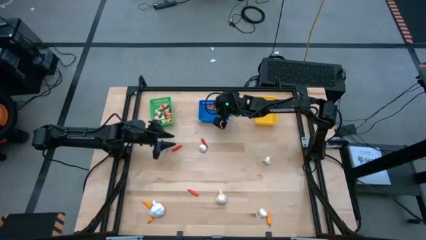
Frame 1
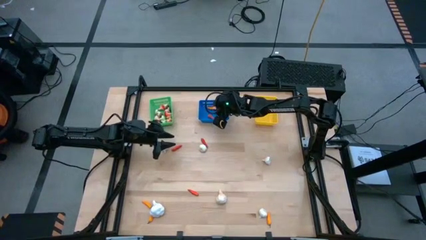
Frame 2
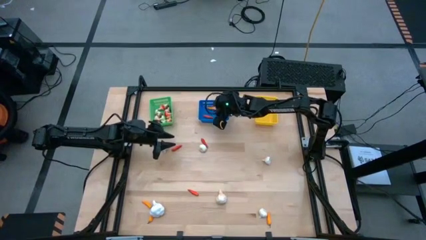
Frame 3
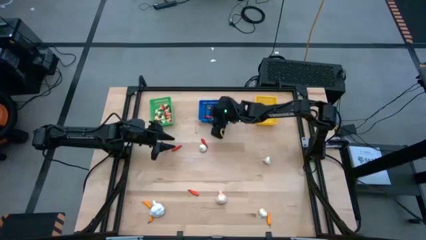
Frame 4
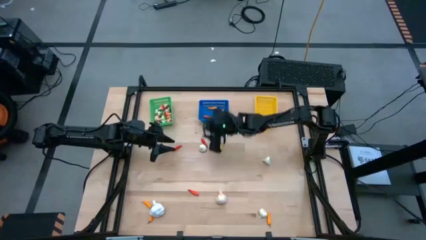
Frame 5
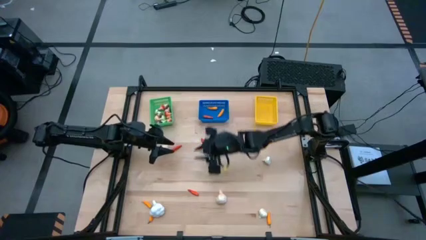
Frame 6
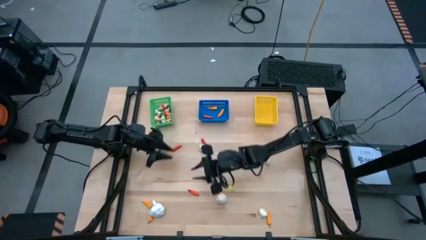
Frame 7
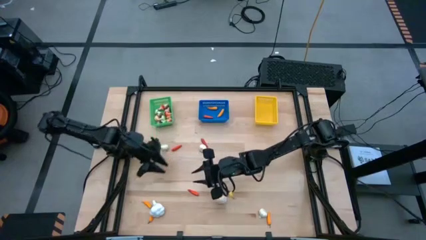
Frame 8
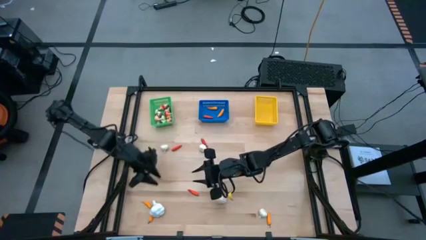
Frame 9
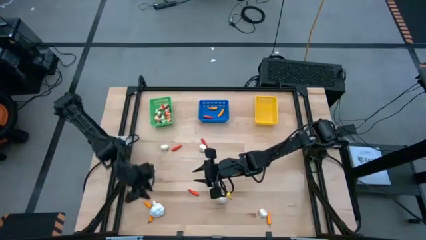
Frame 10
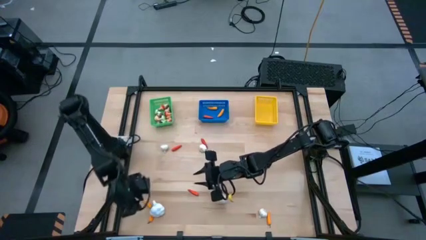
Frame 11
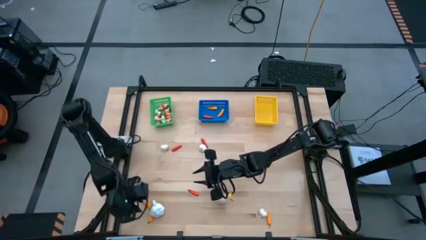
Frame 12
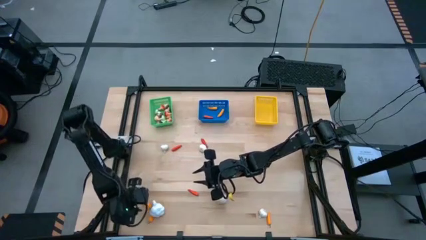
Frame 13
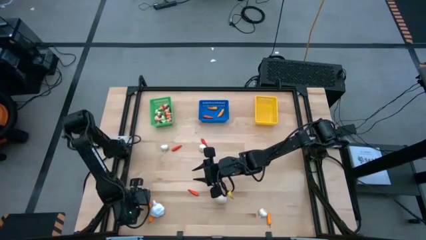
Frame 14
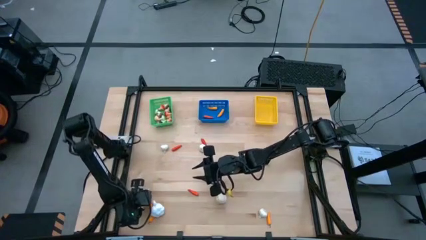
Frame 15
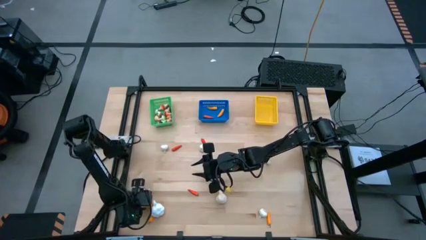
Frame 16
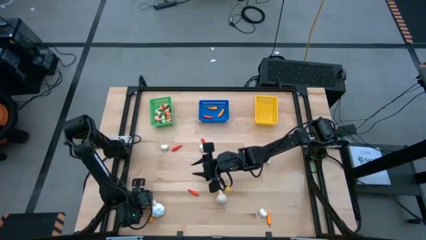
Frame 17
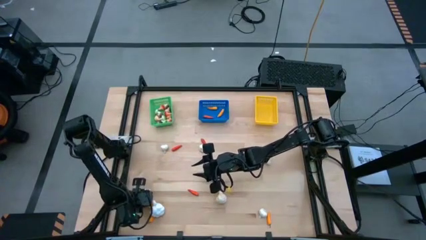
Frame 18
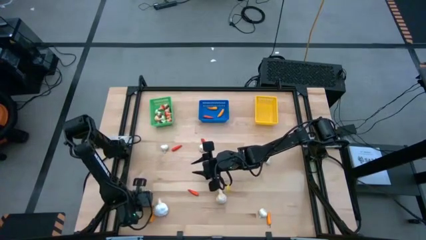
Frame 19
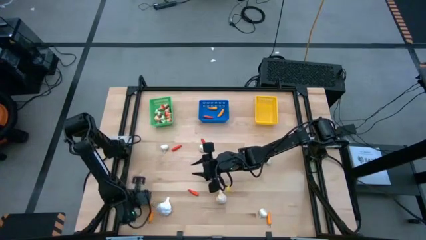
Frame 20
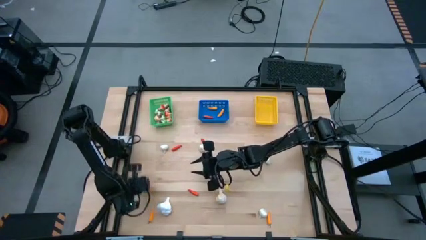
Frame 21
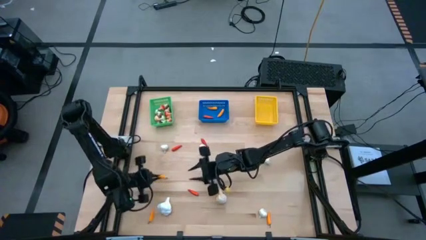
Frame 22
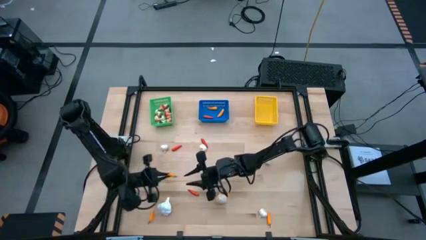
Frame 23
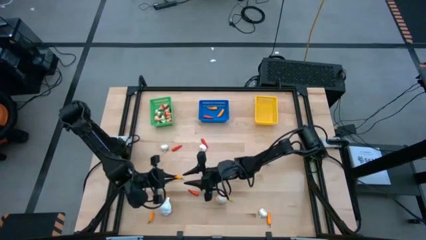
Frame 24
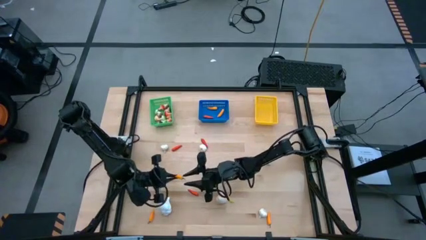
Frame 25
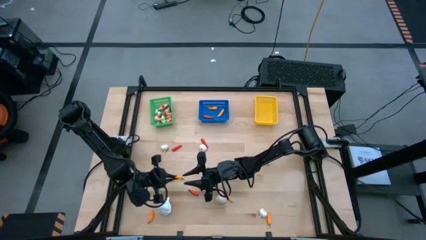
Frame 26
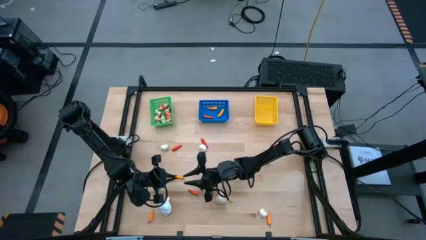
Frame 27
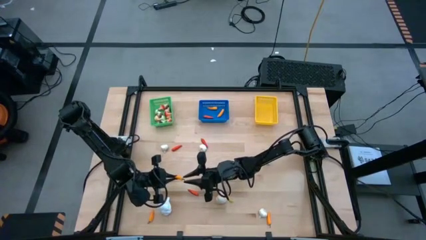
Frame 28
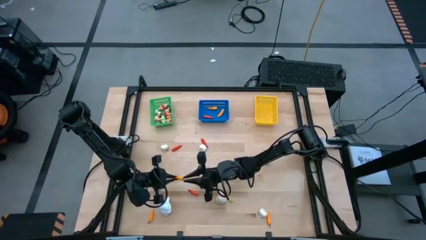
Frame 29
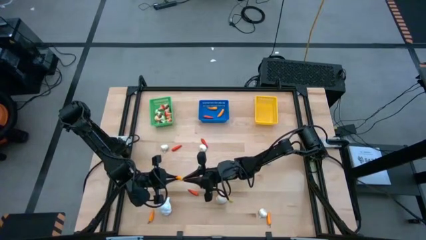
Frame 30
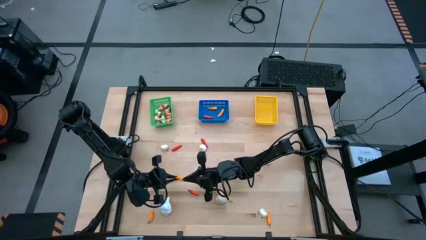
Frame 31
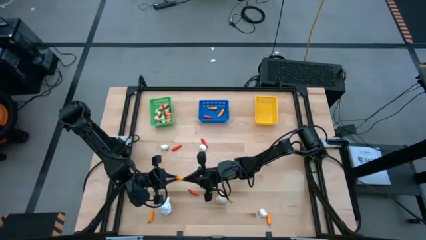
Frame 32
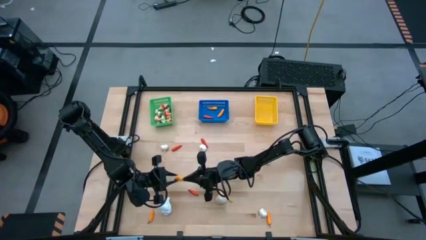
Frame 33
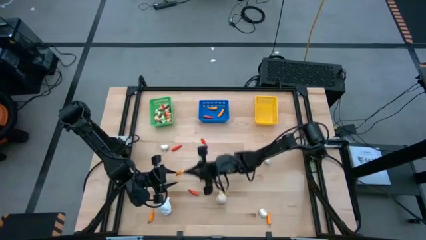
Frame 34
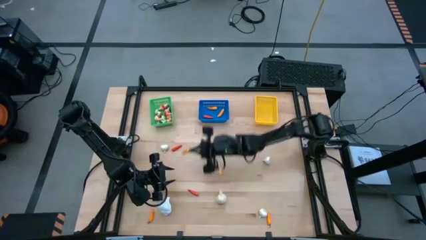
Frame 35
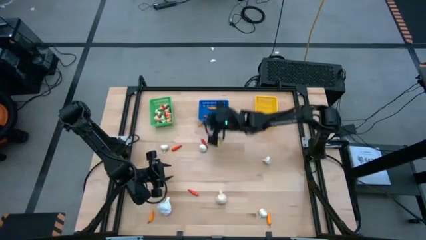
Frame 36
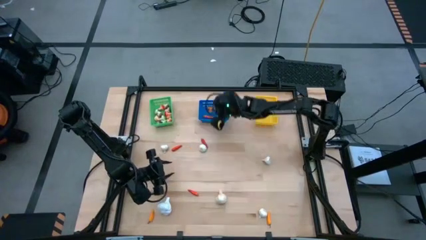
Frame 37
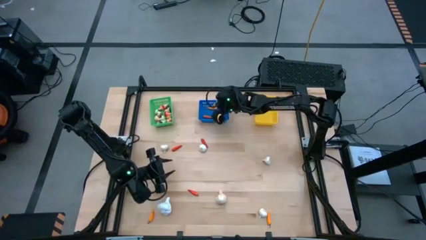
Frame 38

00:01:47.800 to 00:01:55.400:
Task: Sort produce into baskets
Put the yellow chili pepper into the blue bin

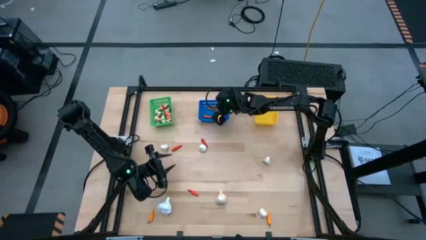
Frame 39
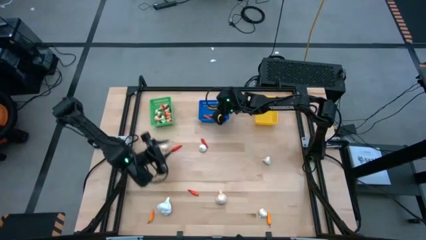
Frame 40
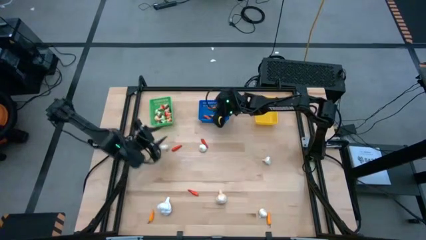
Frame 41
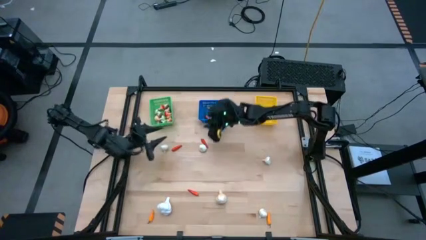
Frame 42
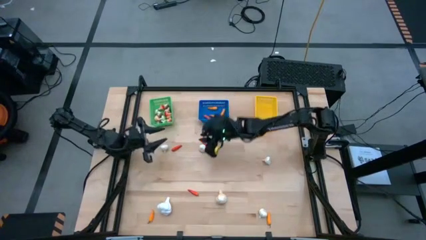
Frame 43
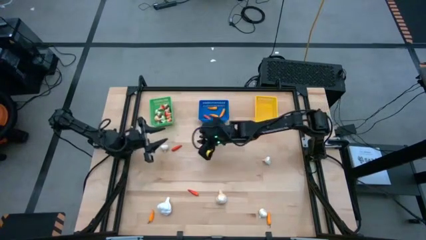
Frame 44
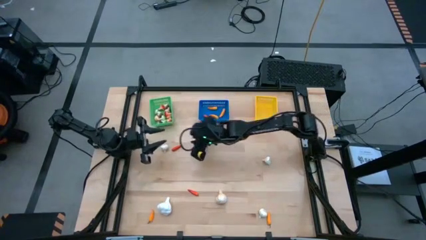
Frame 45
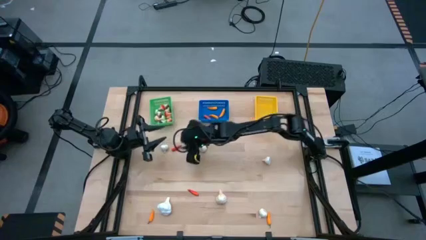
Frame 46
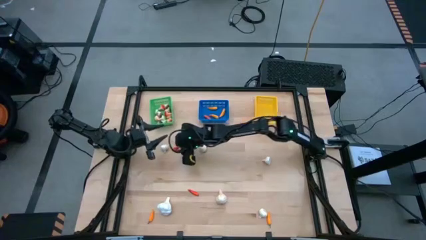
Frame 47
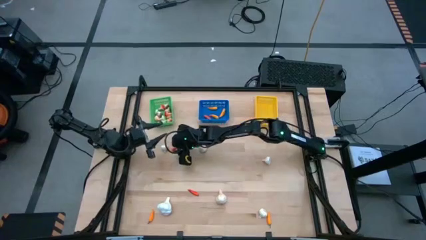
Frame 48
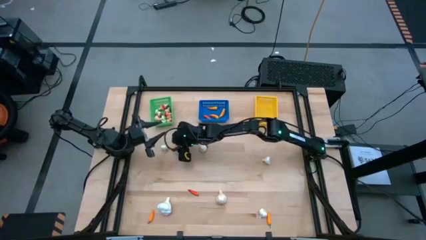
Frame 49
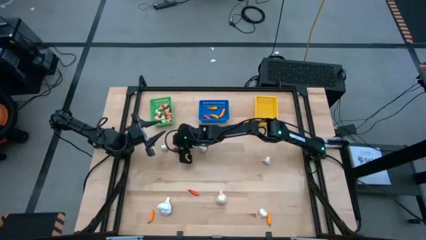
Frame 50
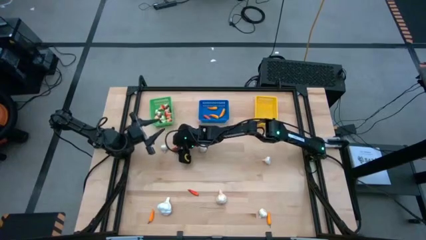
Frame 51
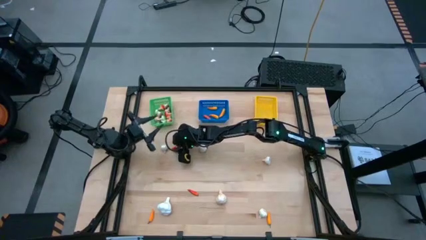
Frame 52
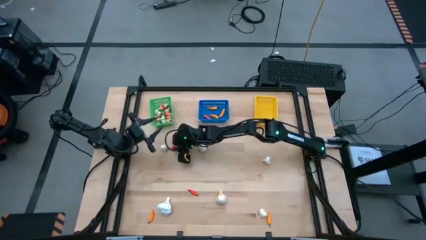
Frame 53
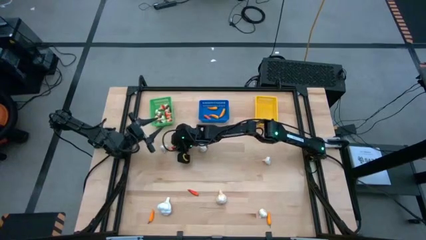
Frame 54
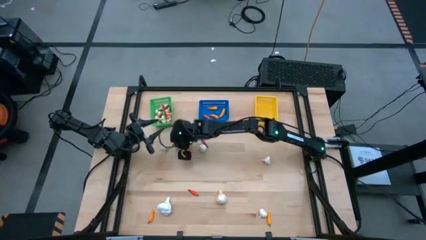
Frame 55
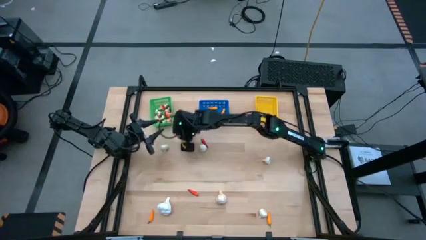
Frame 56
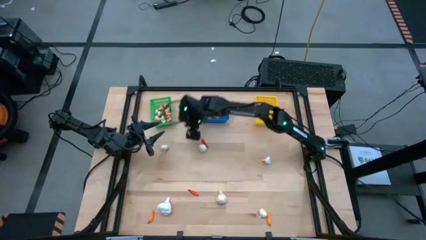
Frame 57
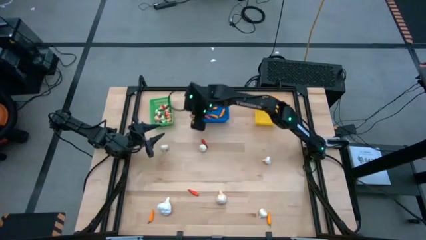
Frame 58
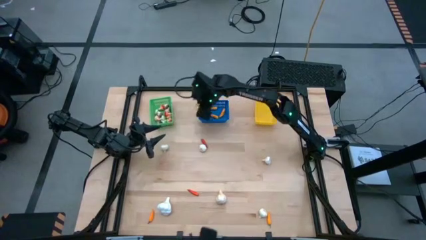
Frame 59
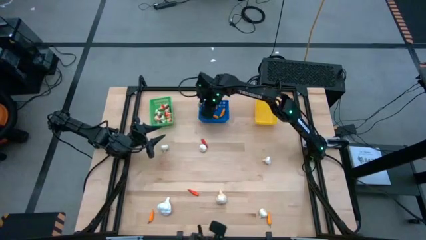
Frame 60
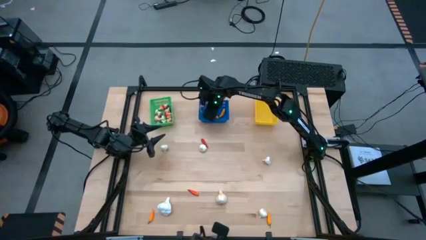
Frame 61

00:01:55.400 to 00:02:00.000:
Put the orange chili pepper into the blue bin

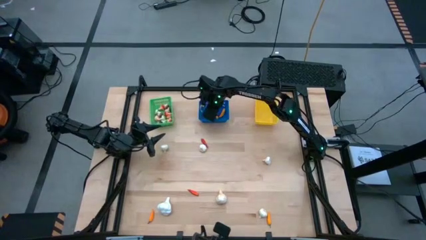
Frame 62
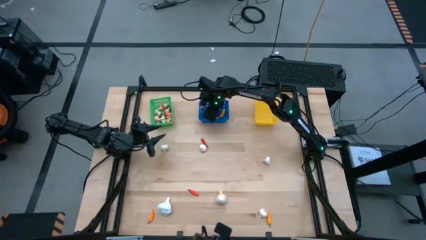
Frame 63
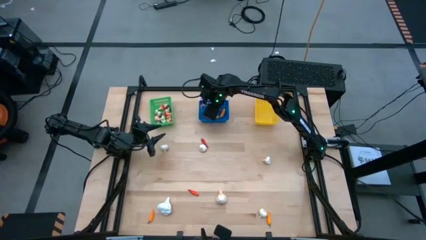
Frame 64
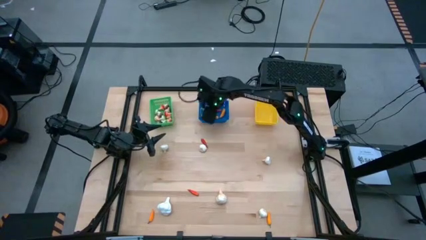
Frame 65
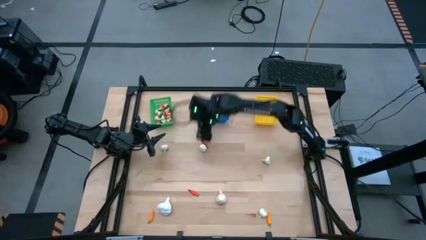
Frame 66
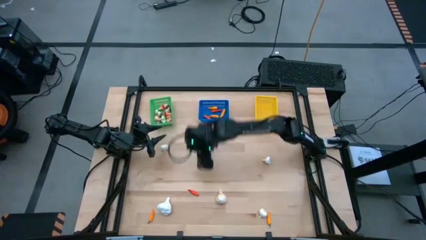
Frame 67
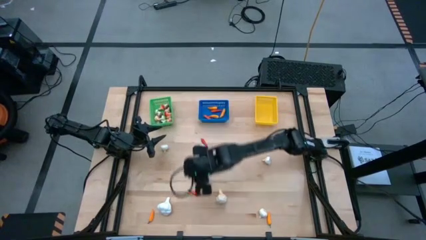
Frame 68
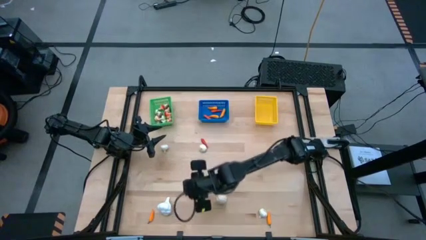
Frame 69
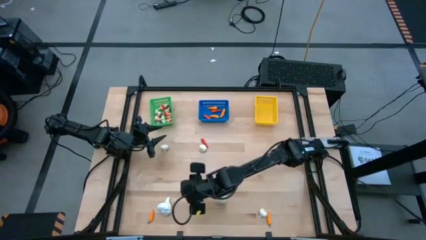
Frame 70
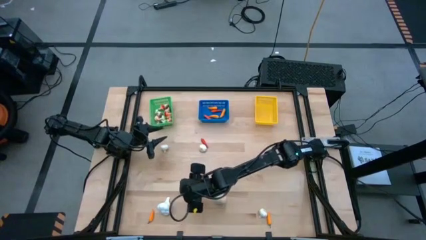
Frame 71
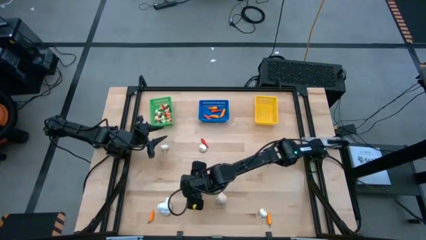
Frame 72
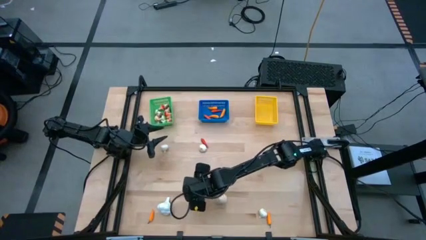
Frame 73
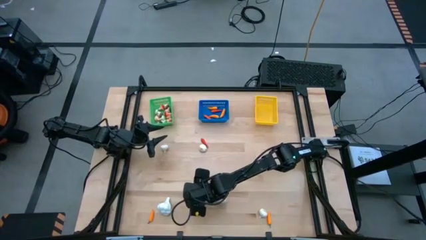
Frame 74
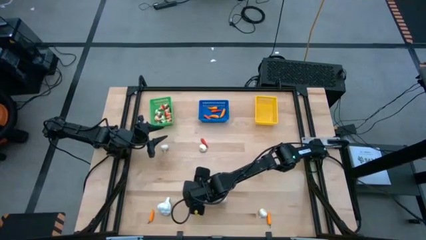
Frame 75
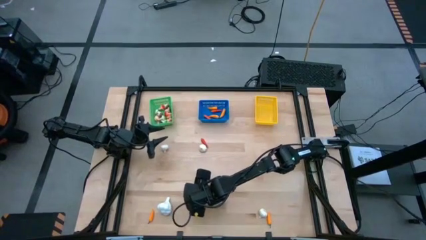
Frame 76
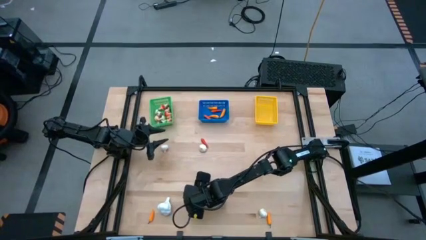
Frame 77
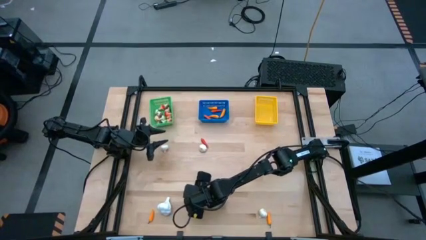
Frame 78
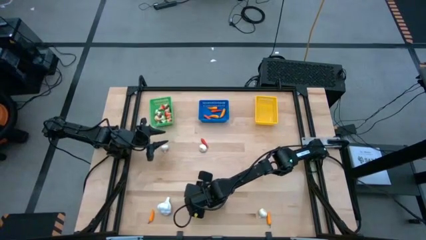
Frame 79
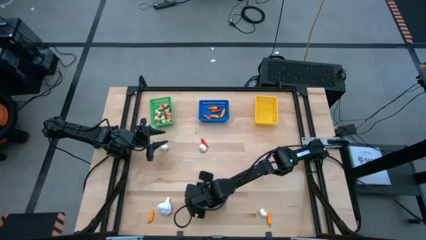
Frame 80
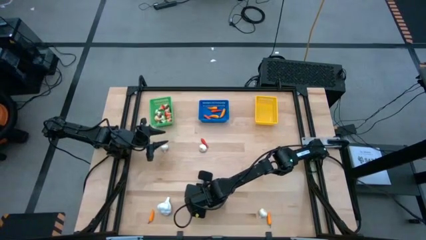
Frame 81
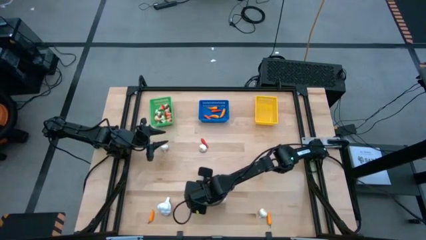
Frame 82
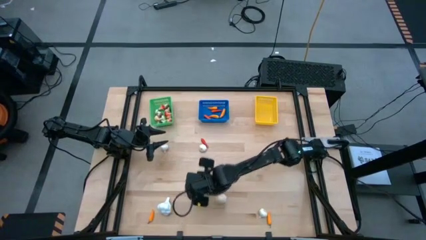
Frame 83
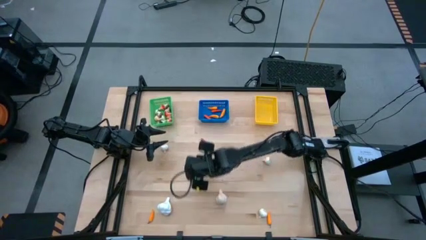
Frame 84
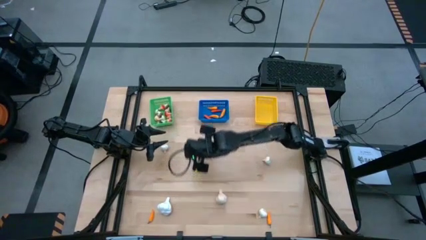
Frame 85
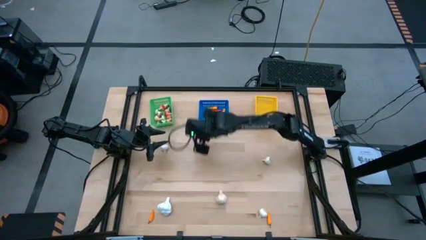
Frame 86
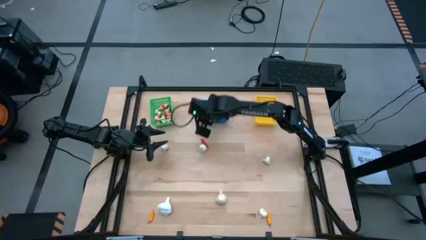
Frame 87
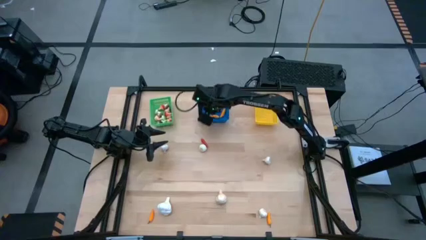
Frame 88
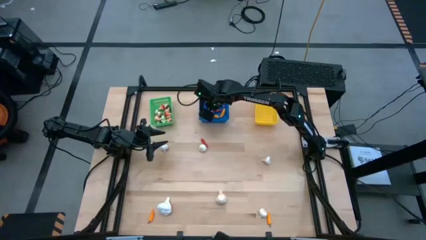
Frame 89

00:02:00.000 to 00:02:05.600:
Put the orange chili pepper into the blue bin
